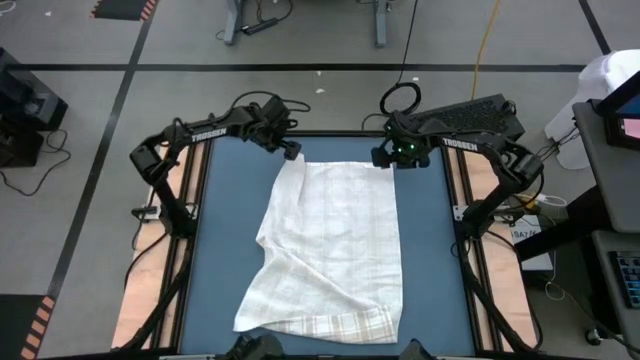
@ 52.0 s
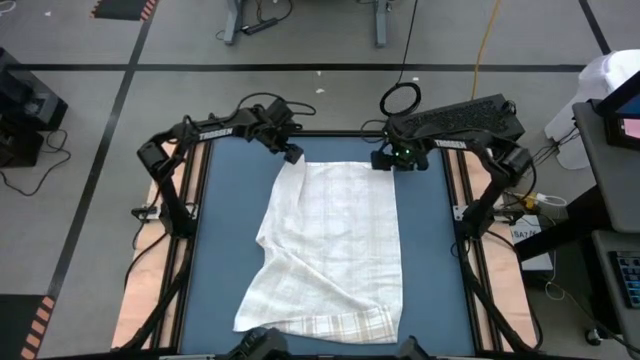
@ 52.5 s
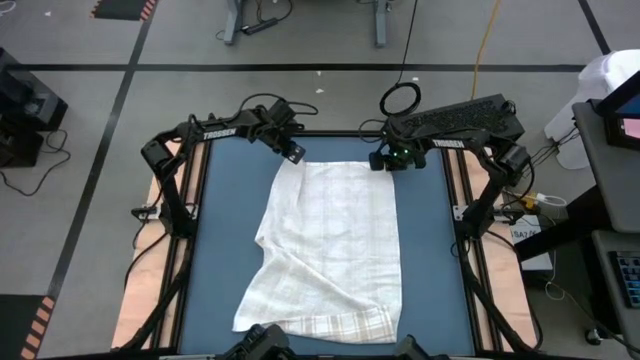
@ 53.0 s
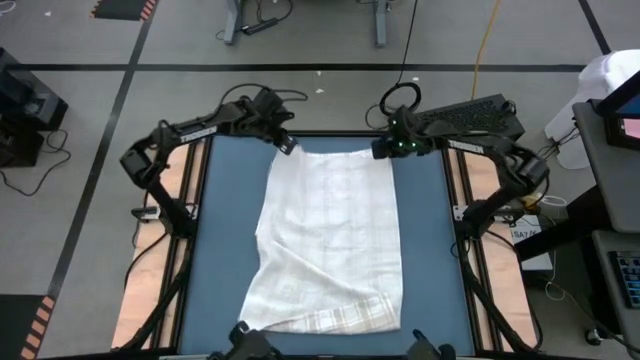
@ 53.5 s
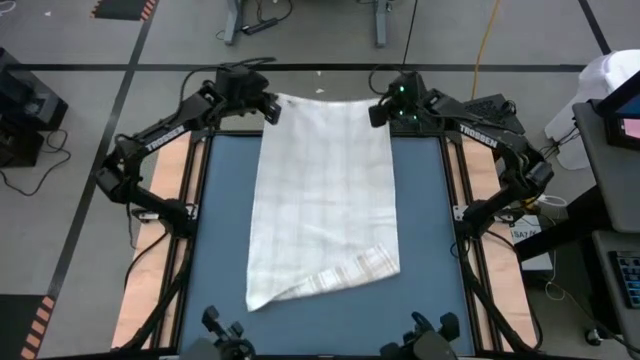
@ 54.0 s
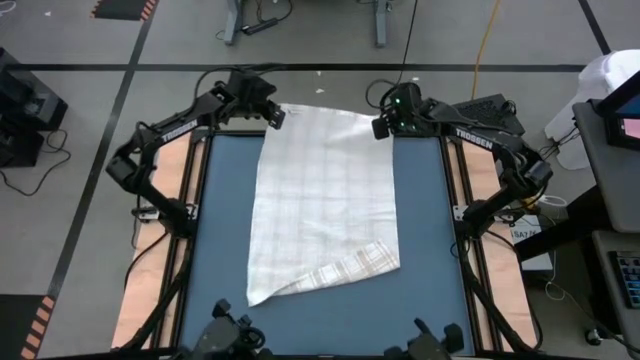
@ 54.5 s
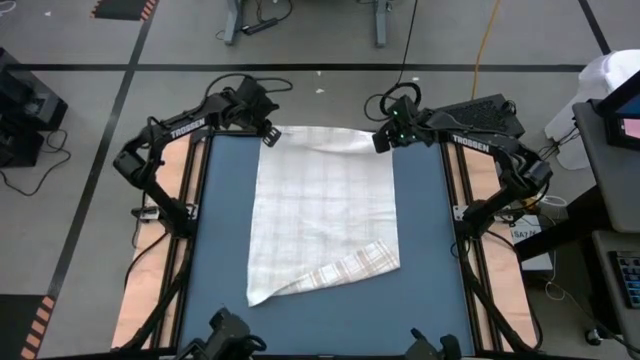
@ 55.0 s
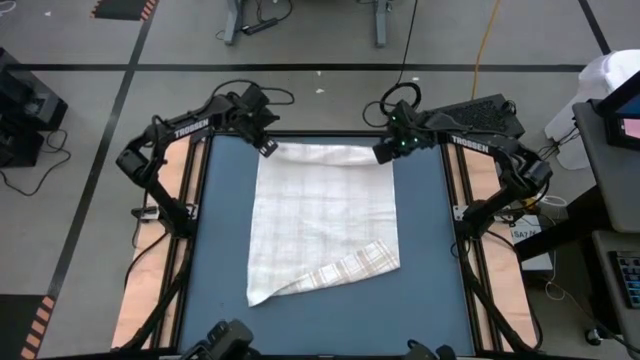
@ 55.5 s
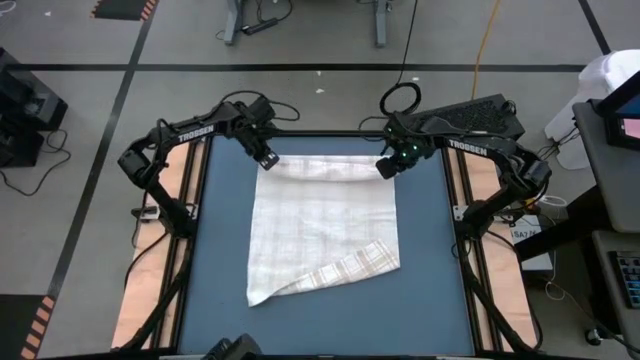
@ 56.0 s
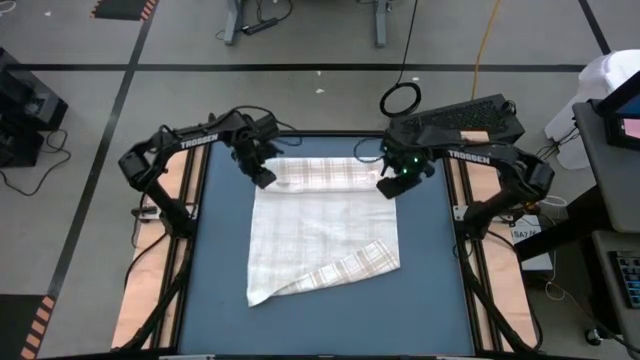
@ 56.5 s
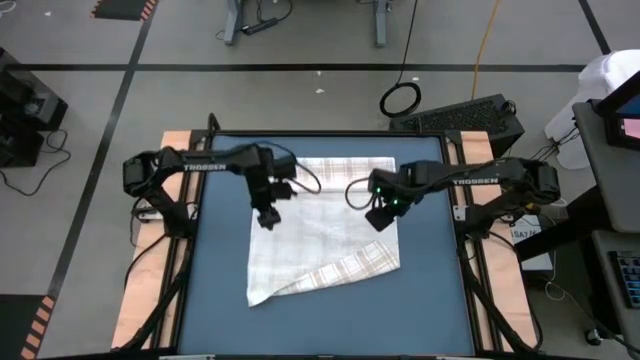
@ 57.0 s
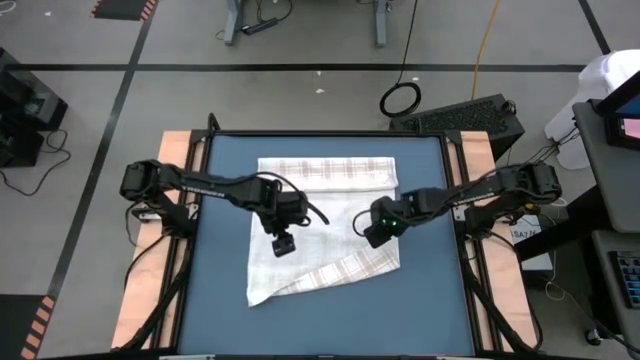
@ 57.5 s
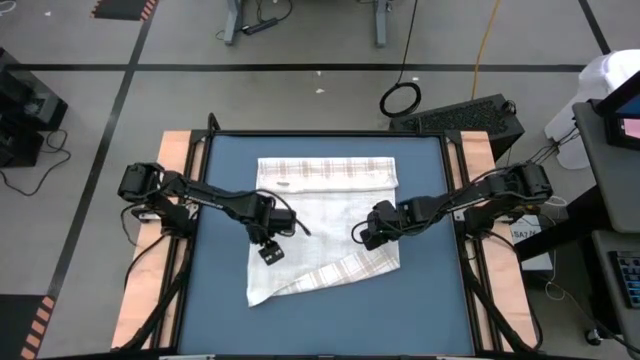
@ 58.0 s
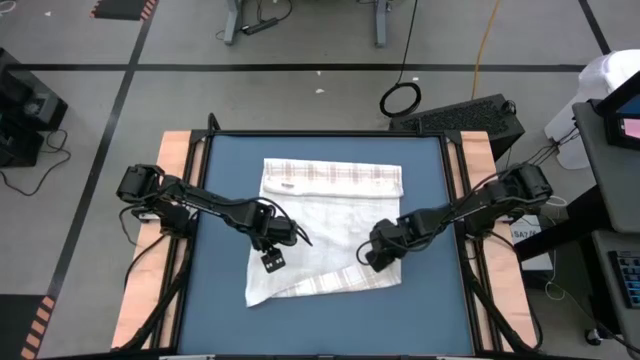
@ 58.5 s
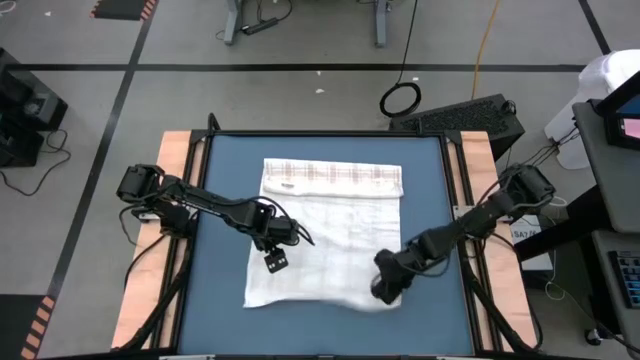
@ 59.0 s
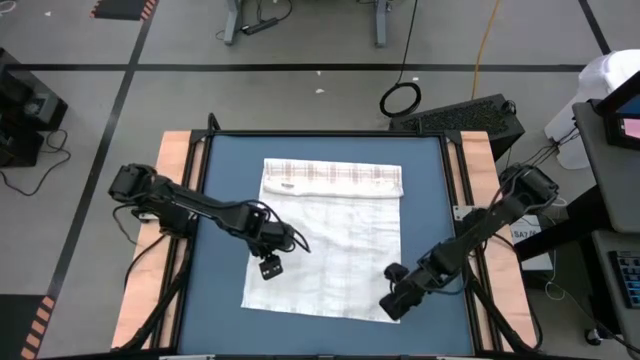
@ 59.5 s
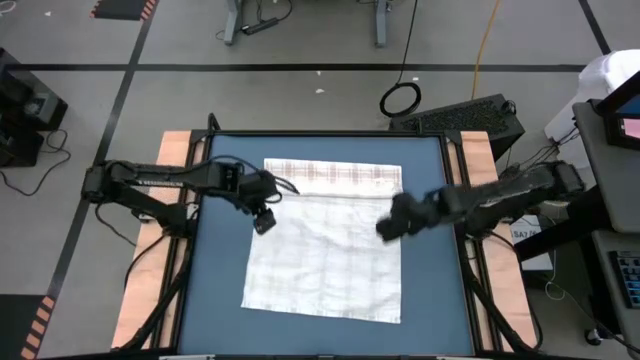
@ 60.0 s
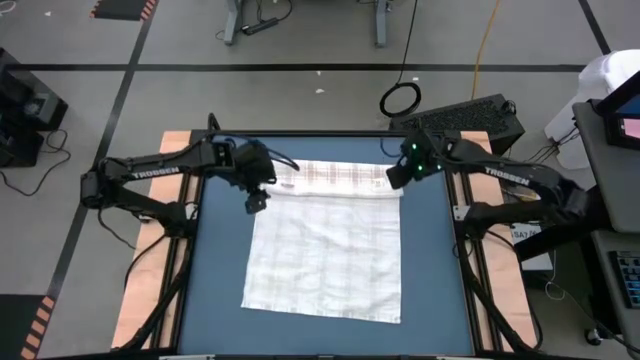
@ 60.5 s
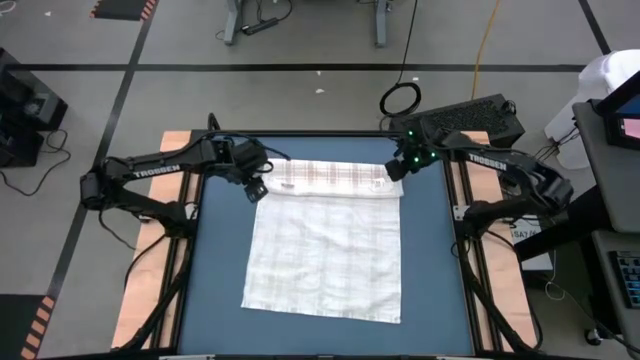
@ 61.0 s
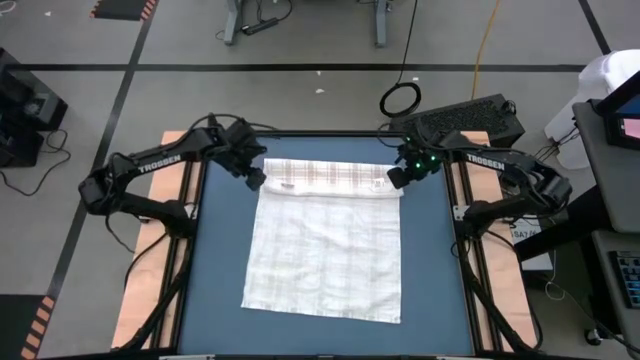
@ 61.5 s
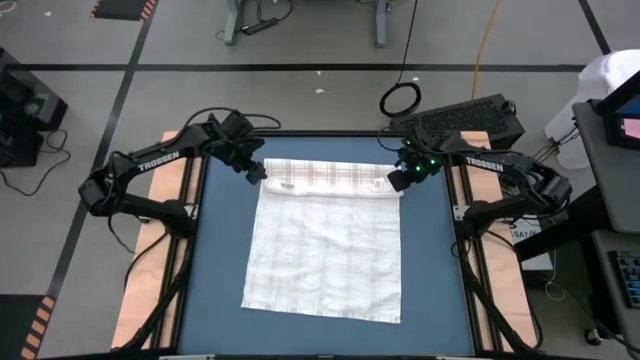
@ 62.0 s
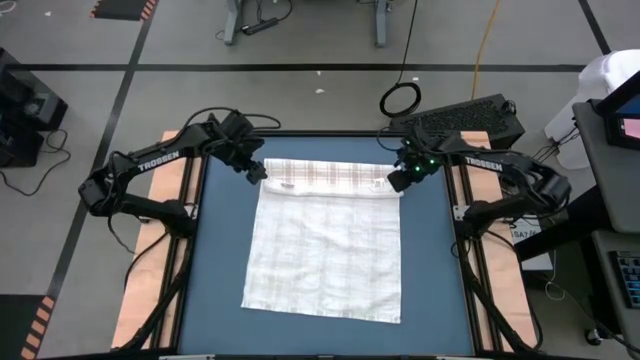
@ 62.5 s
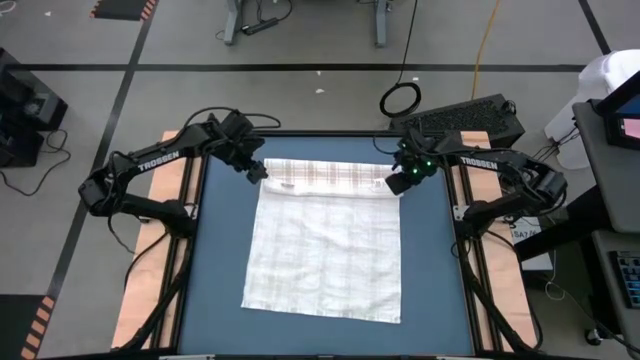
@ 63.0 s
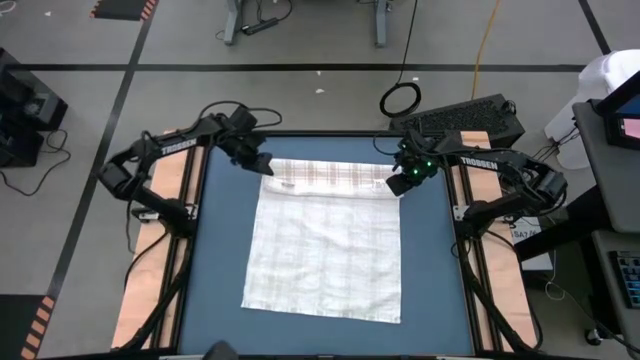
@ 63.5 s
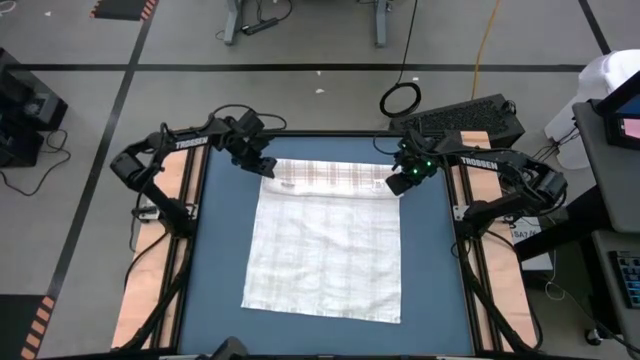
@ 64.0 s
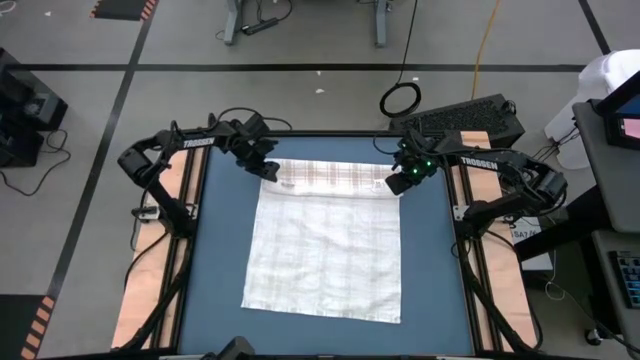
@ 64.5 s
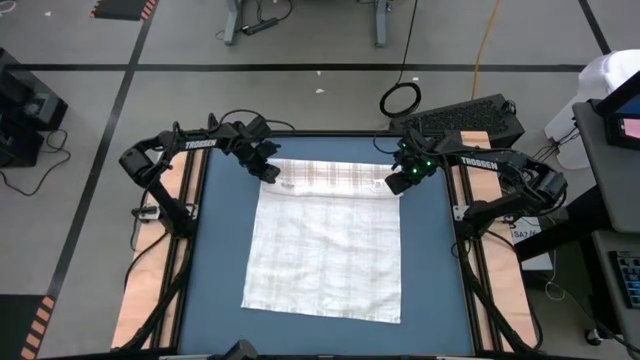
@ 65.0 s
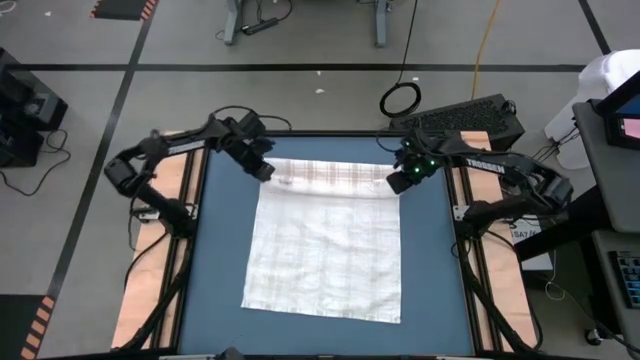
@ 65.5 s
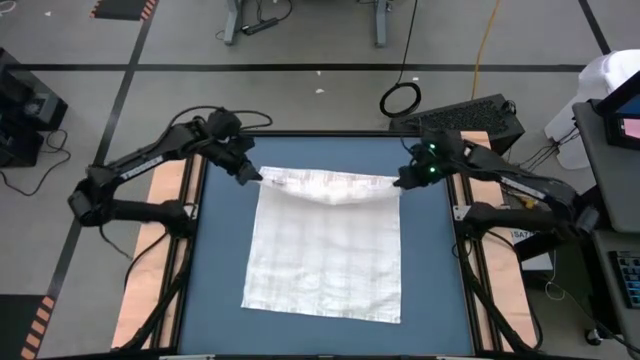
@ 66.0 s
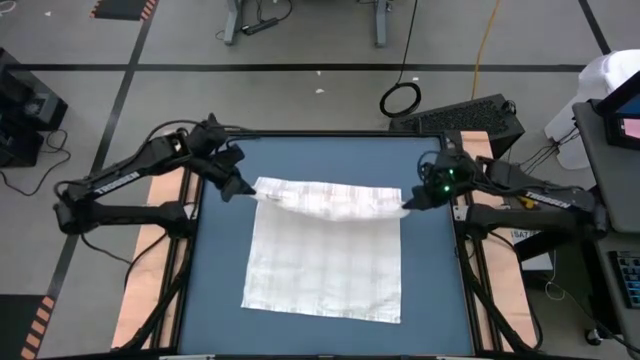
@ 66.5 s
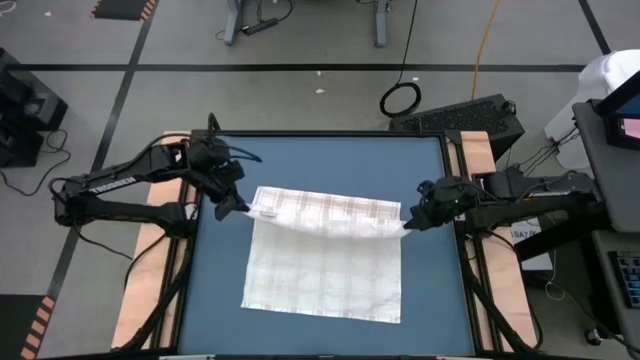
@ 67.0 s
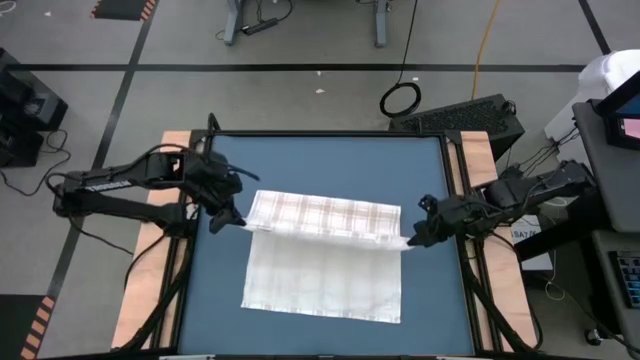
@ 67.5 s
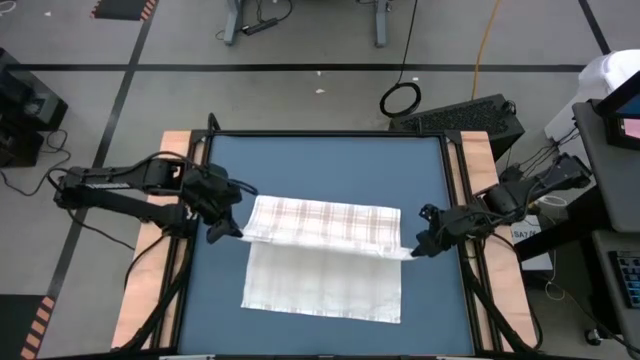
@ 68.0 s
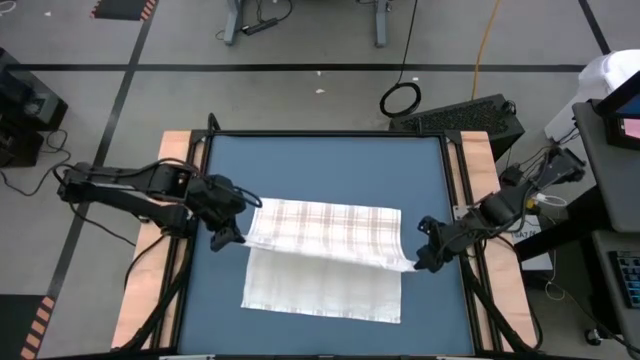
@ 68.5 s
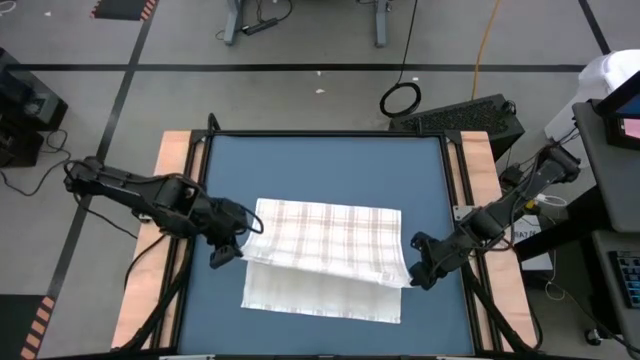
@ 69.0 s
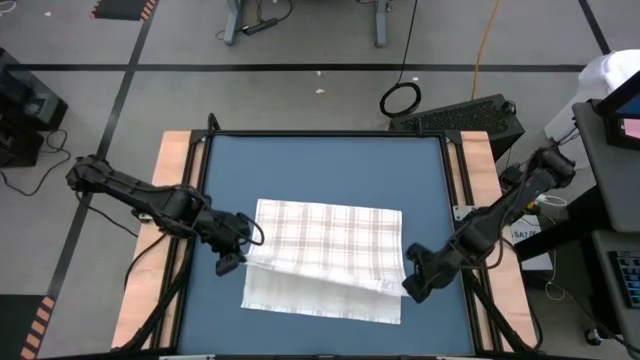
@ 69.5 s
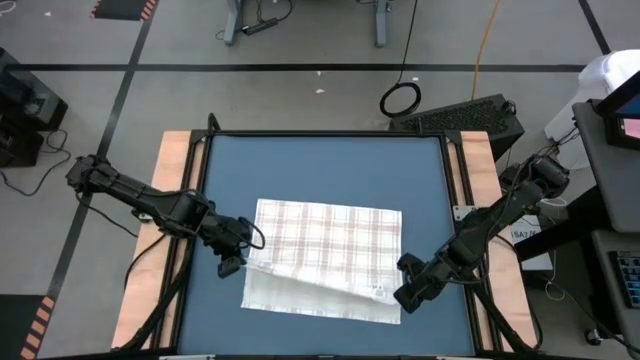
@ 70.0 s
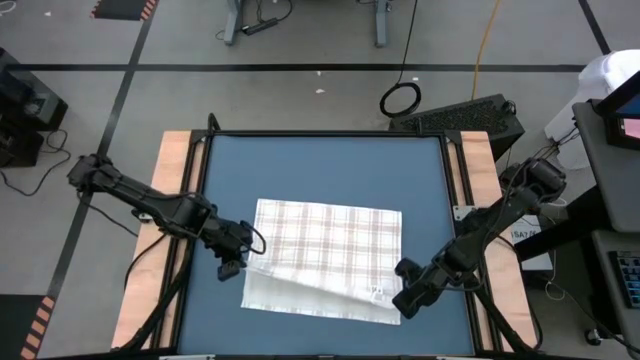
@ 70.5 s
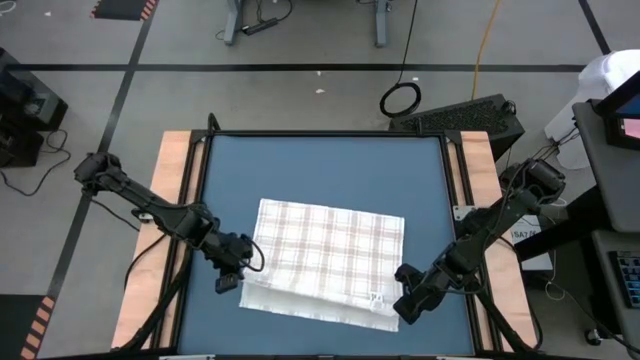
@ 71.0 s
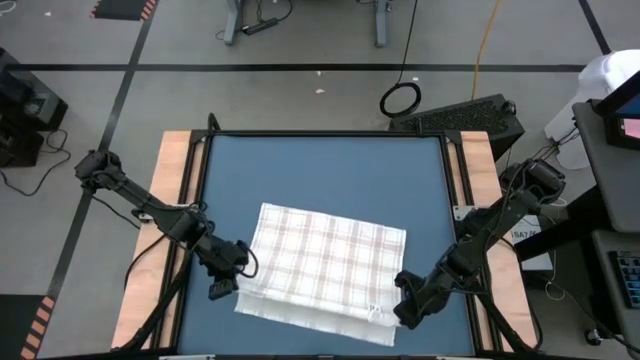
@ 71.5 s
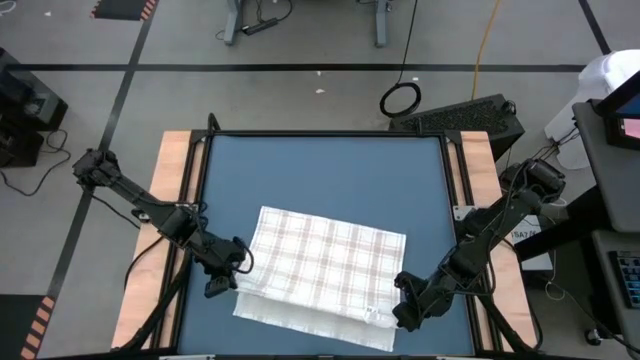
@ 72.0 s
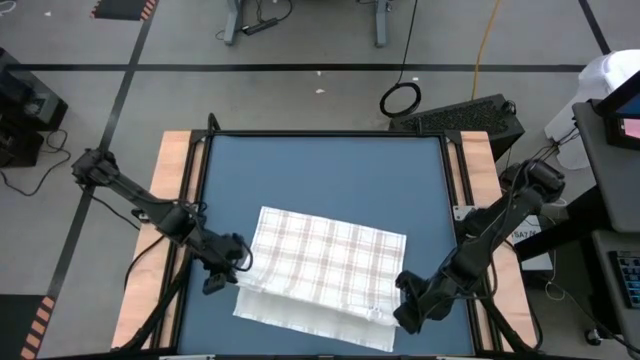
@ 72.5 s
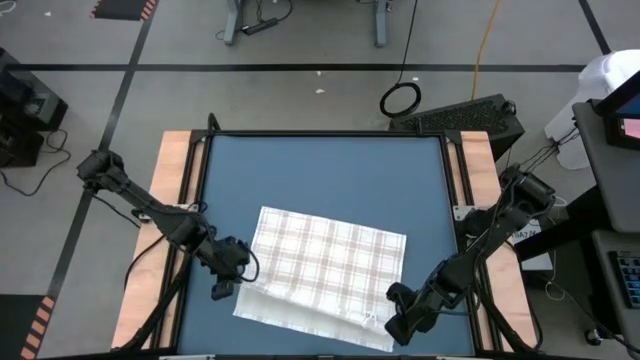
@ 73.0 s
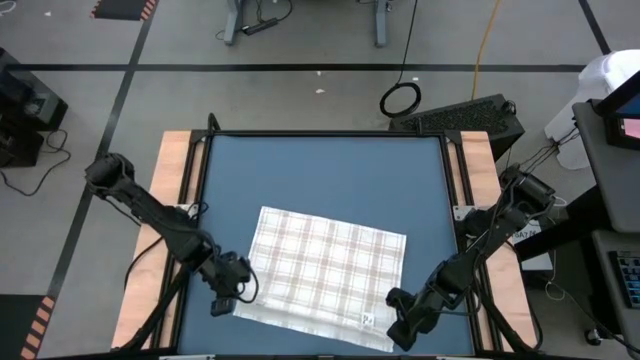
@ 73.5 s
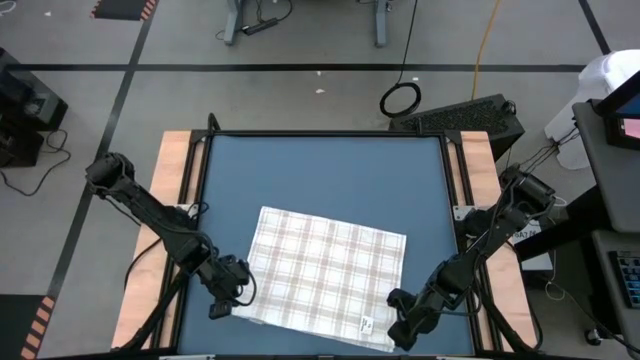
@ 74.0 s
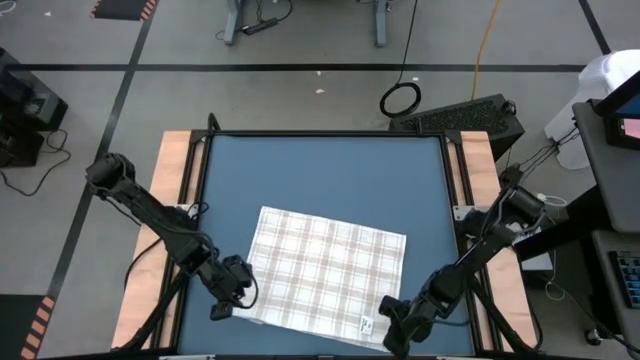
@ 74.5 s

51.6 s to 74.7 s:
Task: Roll towel
Fold the white towel
